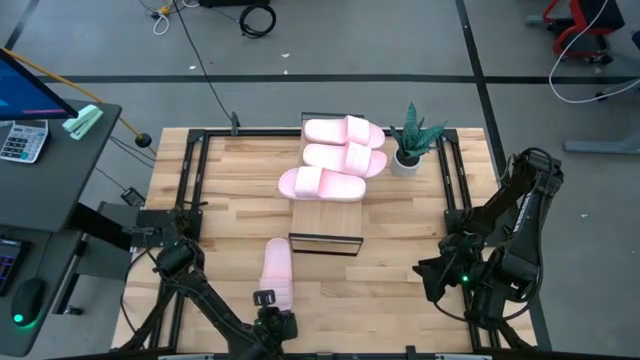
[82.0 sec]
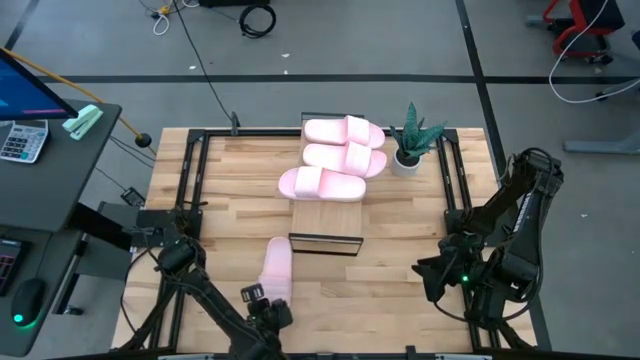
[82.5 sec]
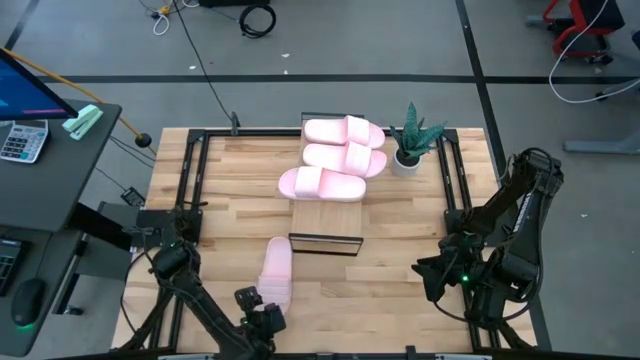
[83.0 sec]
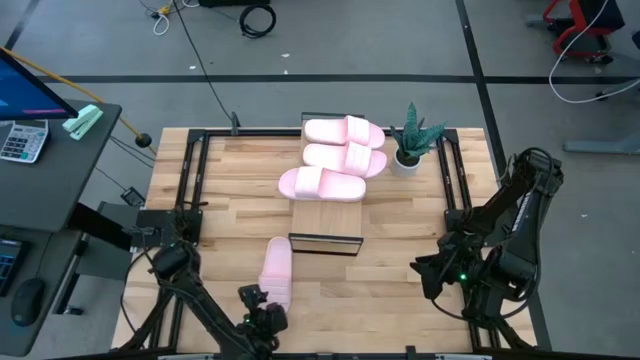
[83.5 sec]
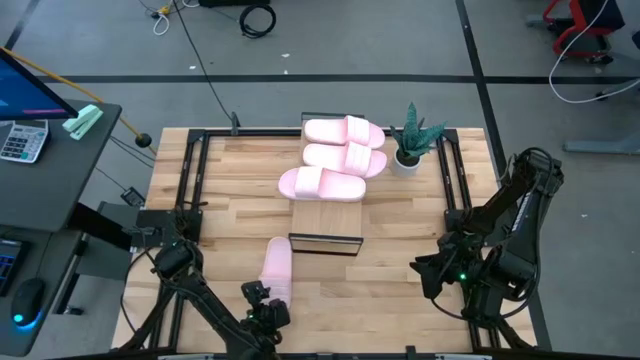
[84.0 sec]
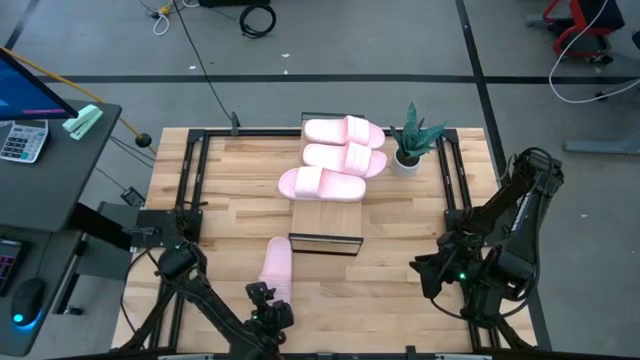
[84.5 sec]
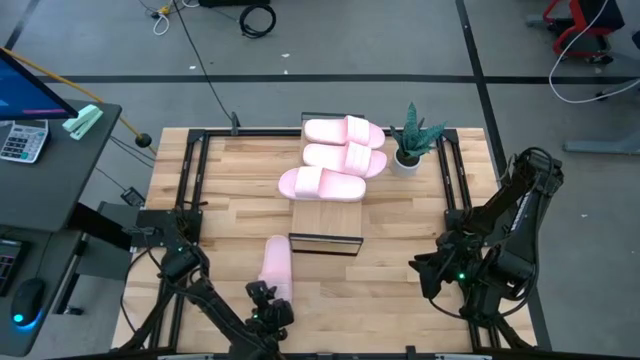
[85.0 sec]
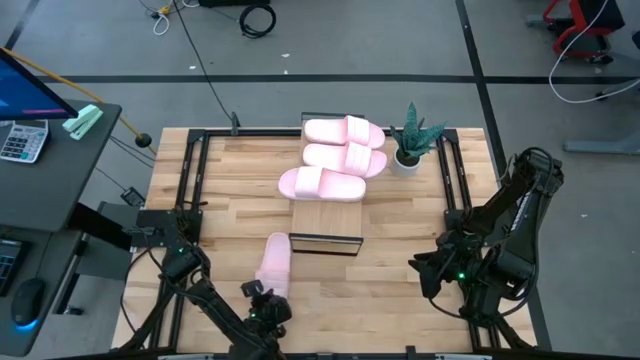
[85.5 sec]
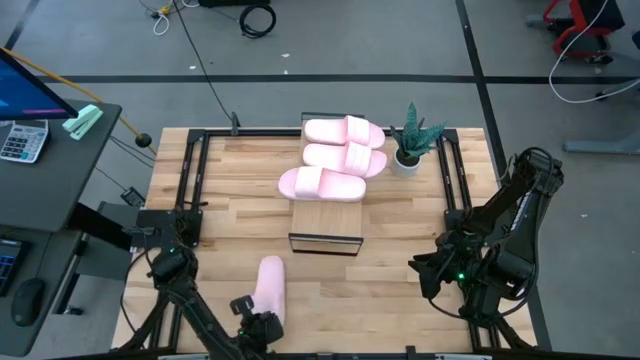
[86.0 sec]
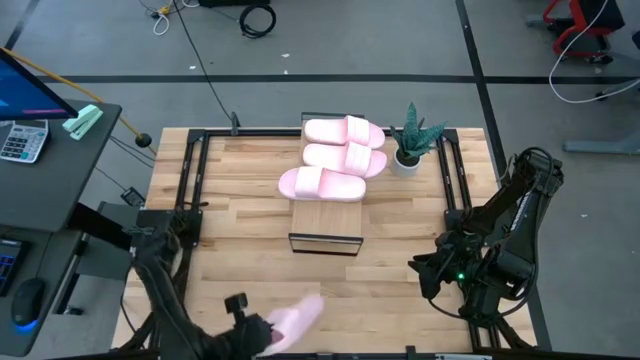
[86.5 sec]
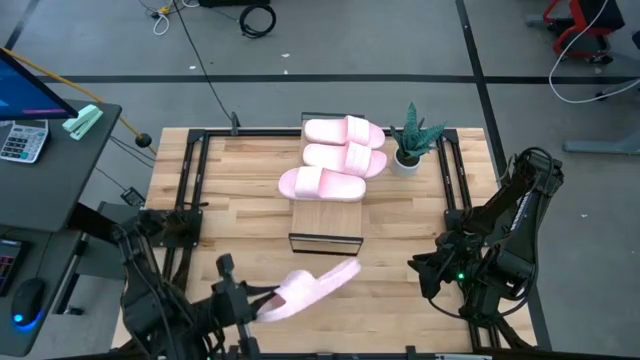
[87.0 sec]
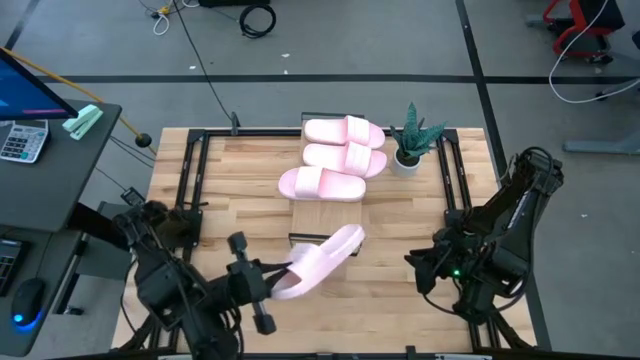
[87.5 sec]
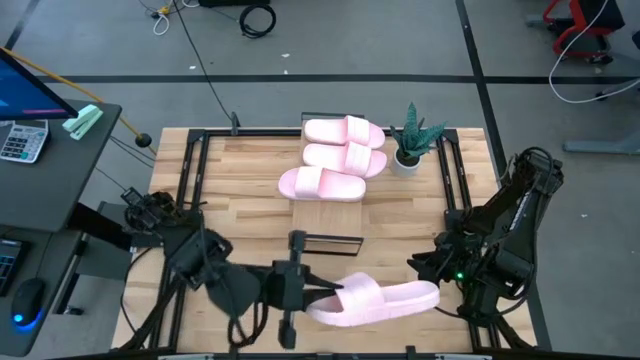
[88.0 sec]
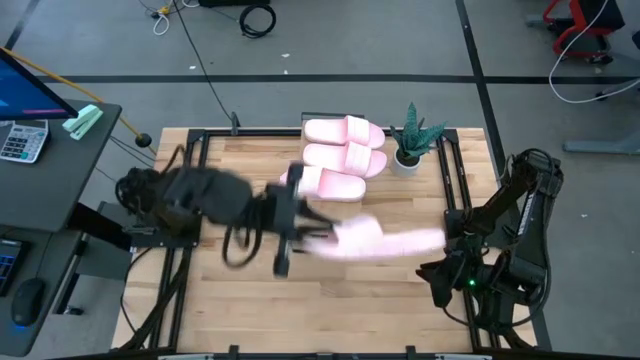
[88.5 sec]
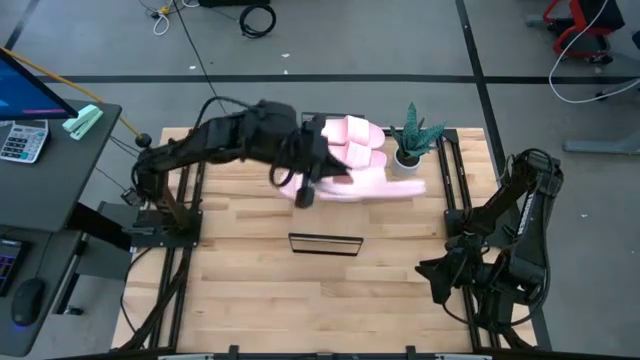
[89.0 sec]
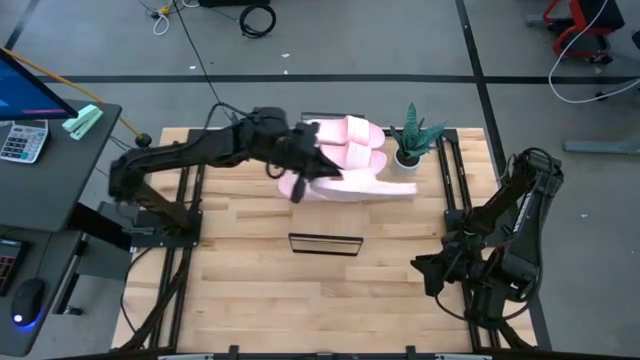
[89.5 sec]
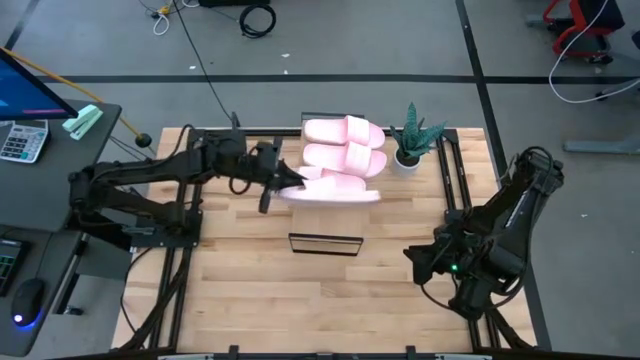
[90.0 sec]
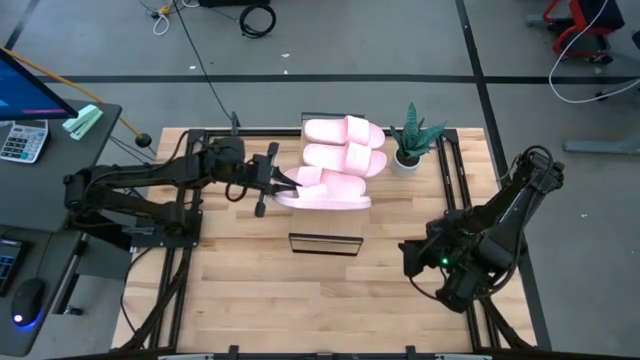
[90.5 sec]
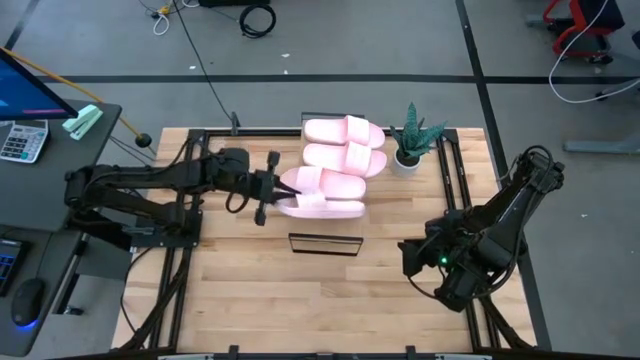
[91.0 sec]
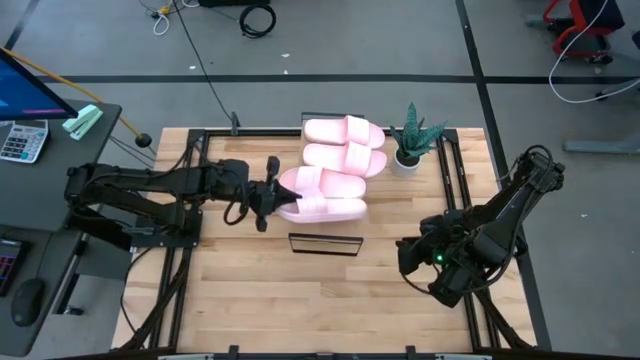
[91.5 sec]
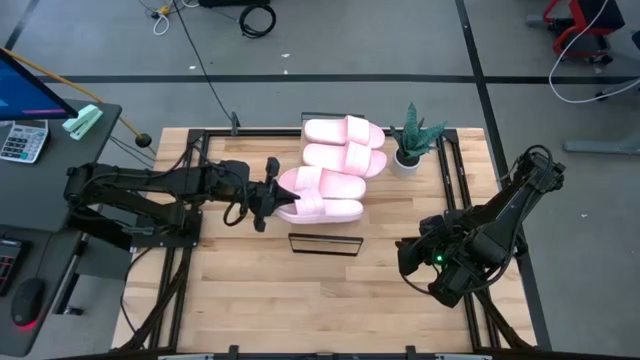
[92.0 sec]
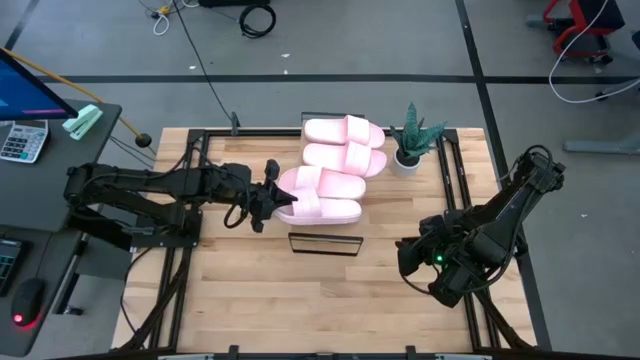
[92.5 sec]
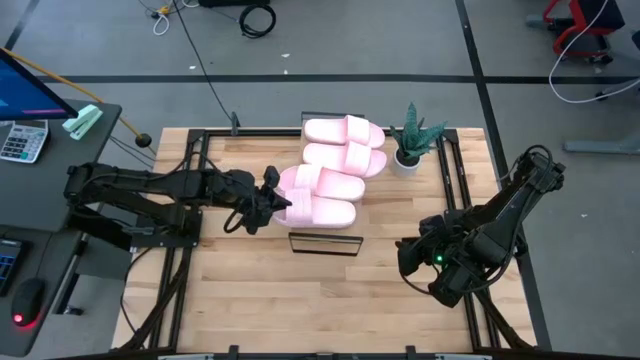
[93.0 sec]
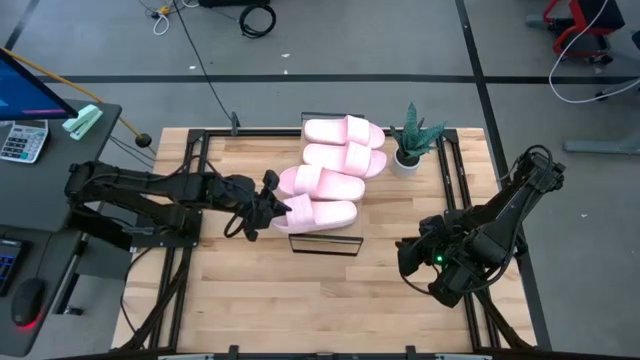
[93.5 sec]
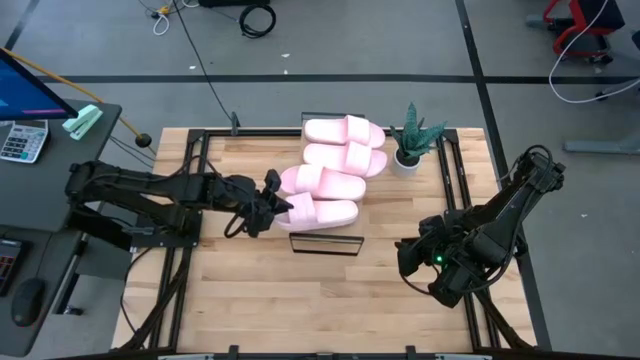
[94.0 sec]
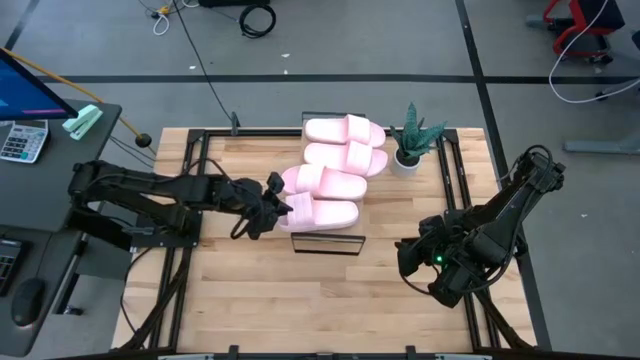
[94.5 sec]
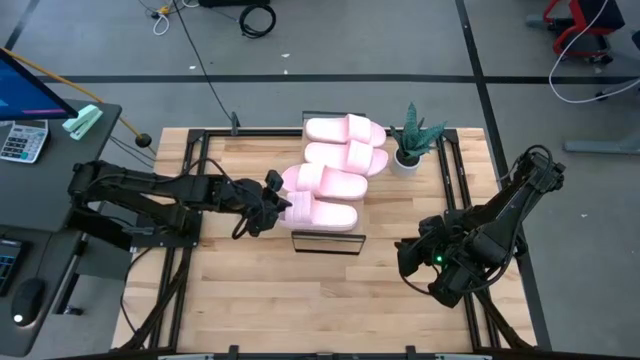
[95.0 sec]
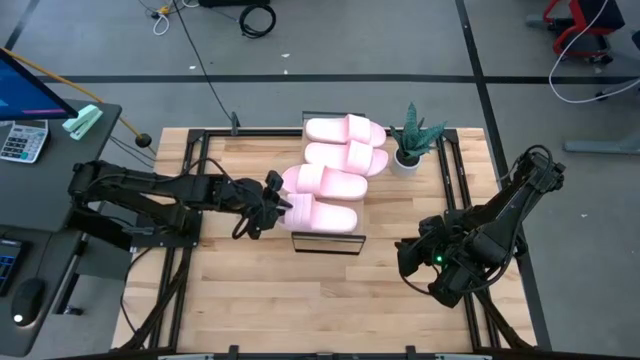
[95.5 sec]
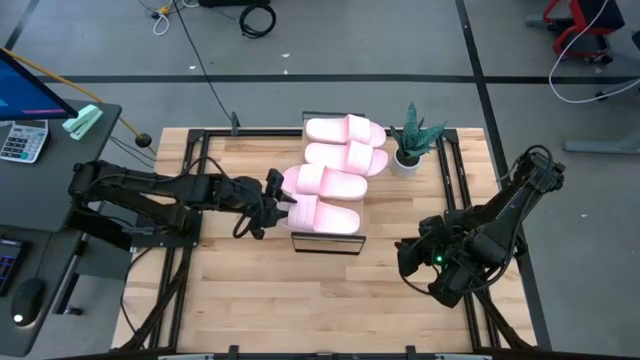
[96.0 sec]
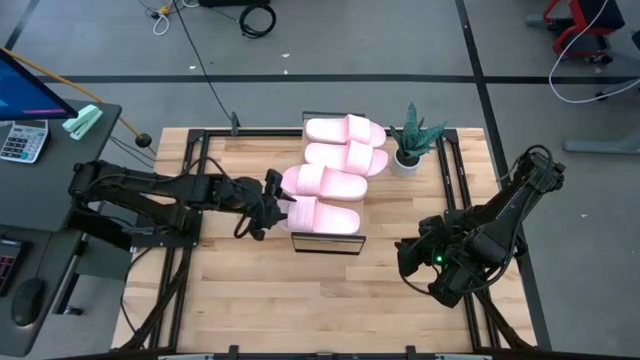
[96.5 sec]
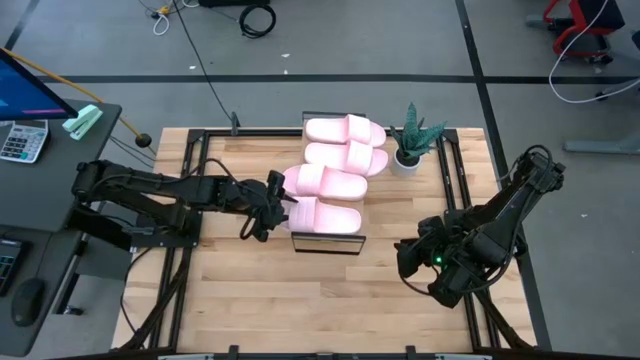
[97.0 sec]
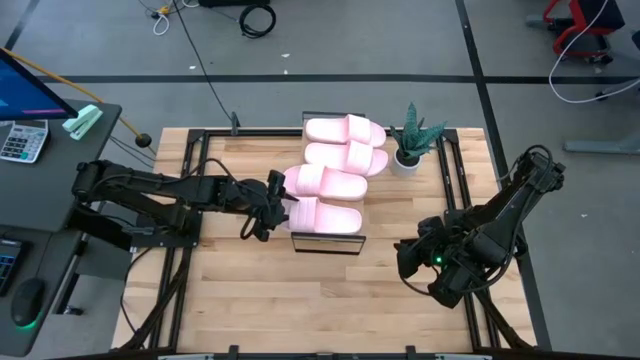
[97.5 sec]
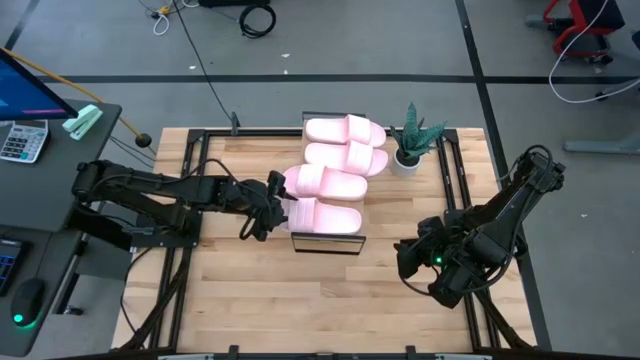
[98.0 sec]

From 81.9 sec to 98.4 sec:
Task: Pick and place slides into the shelf
Put the pink slide on the shelf

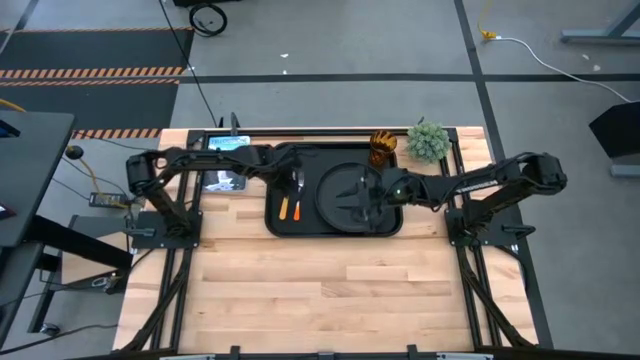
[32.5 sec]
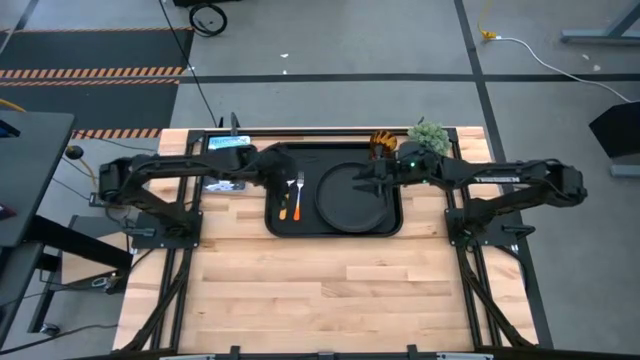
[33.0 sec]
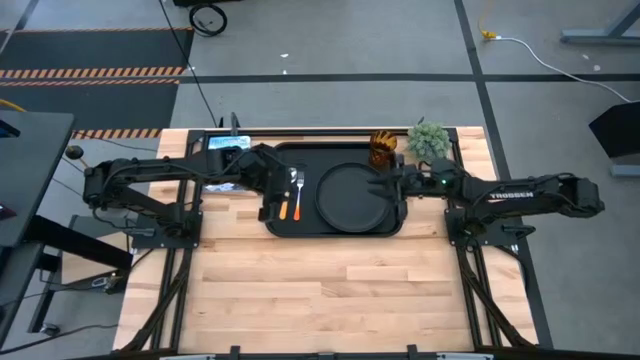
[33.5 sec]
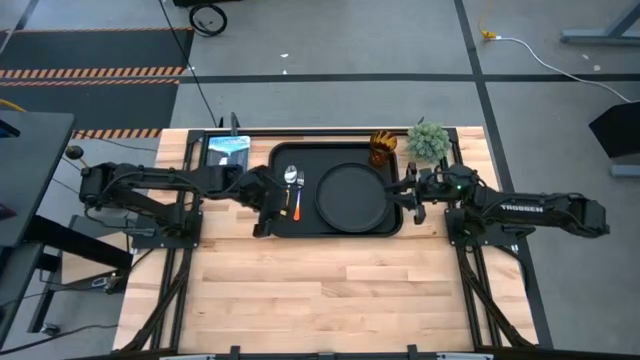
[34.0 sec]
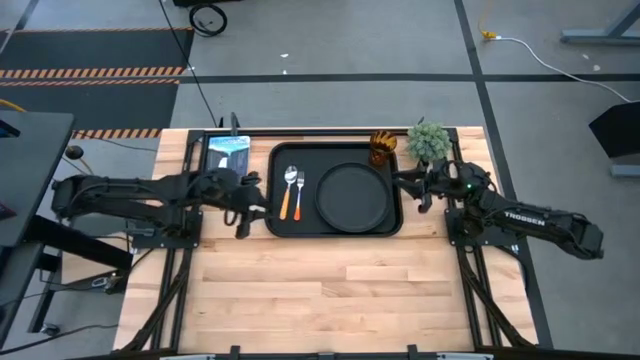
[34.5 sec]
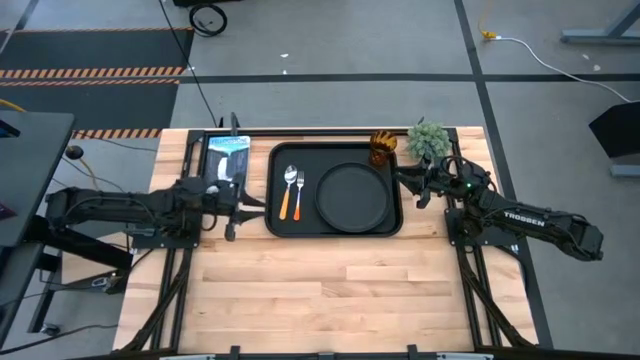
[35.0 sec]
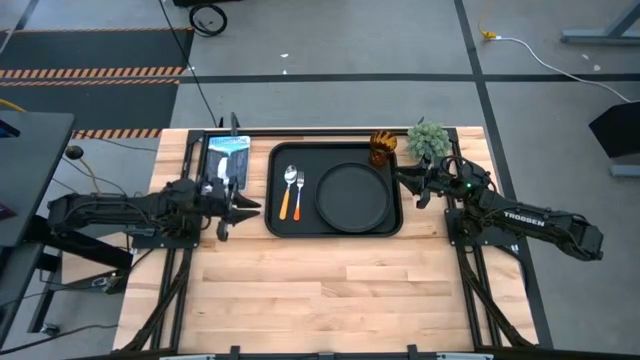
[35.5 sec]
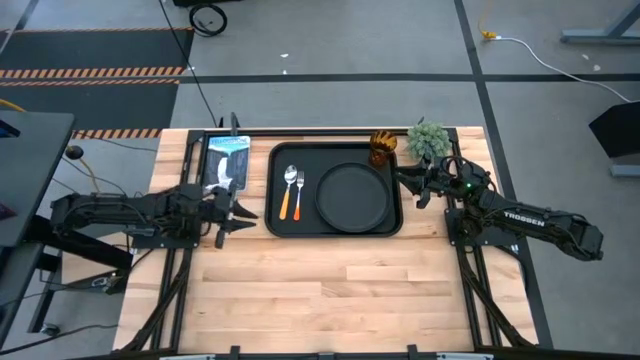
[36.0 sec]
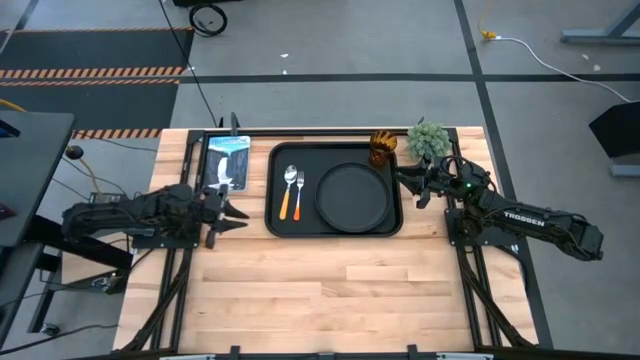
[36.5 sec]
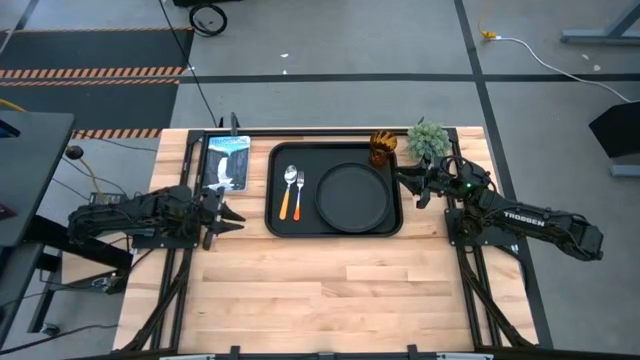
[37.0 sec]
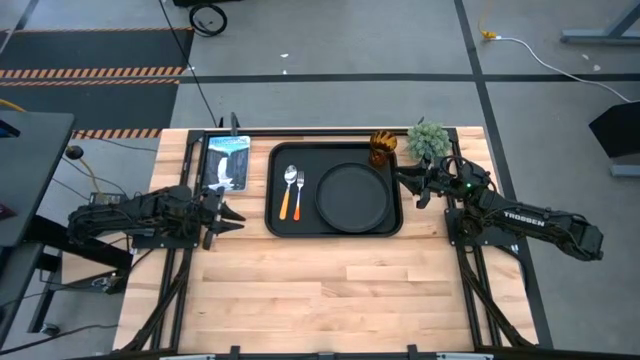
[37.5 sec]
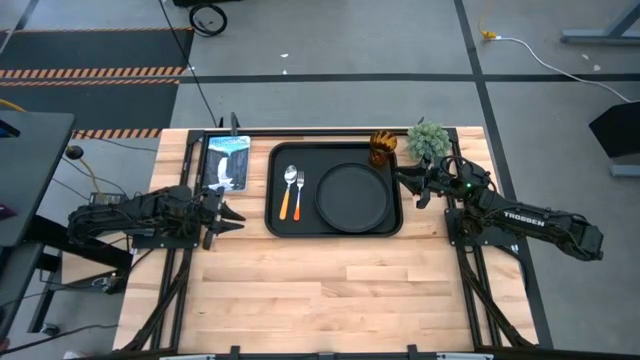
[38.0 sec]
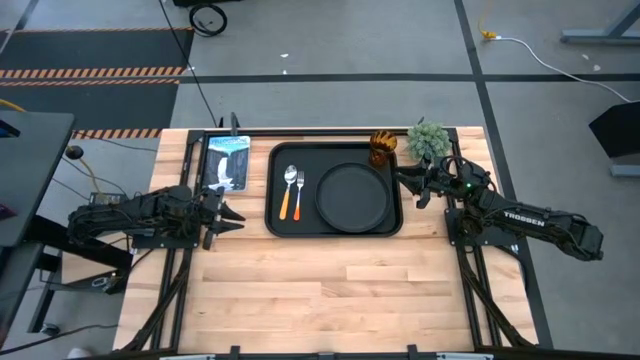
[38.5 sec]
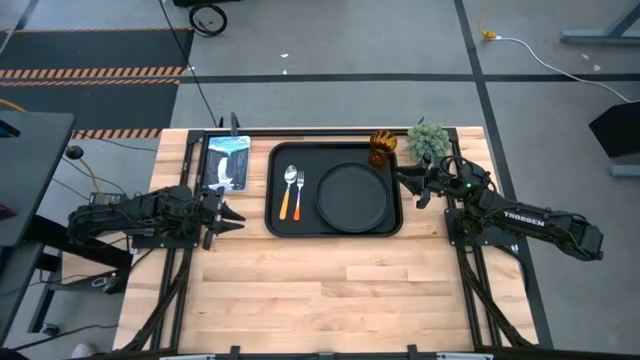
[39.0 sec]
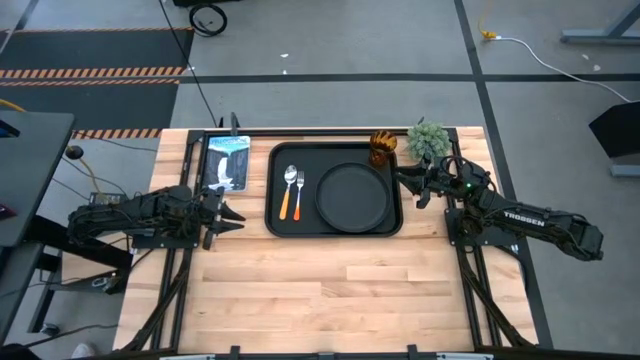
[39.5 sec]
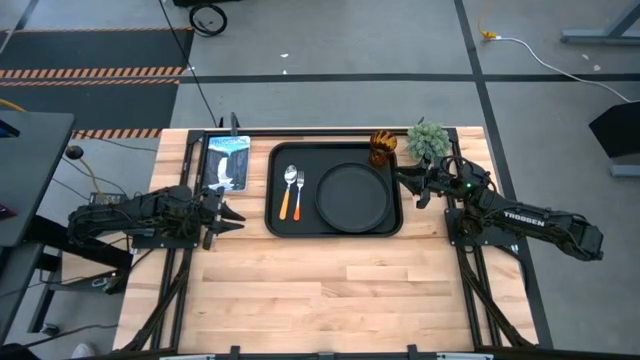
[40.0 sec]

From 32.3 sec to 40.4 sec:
Task: Pick and place plate/cup/fork/spoon on tray
Return to Home Position
